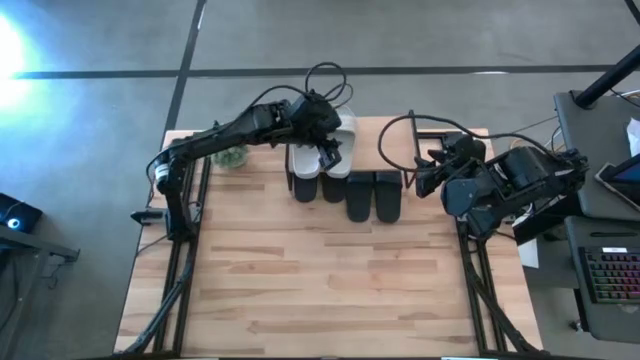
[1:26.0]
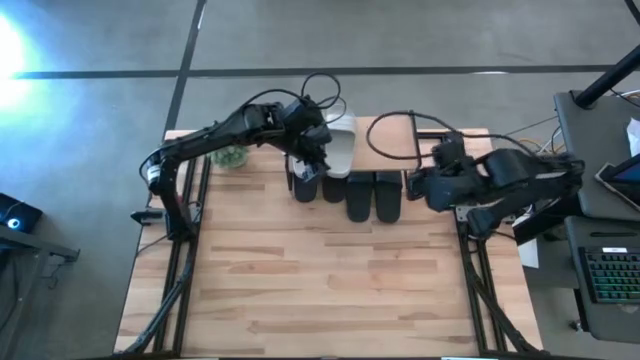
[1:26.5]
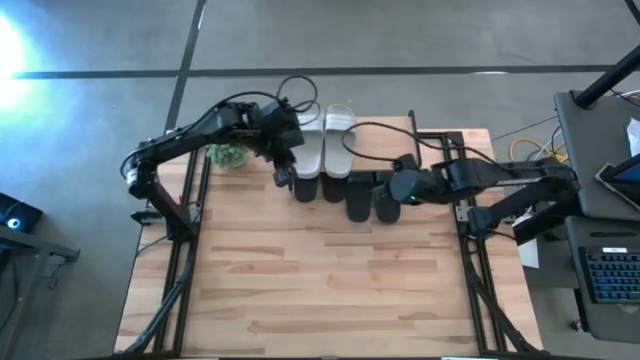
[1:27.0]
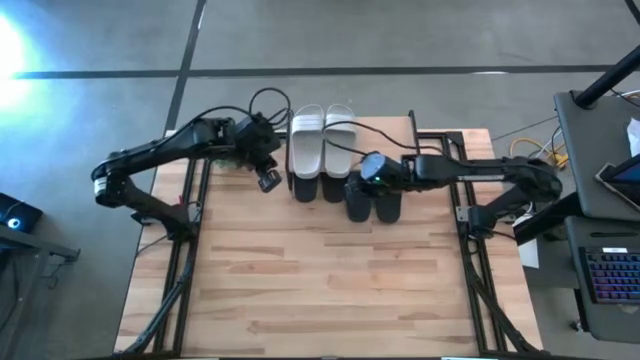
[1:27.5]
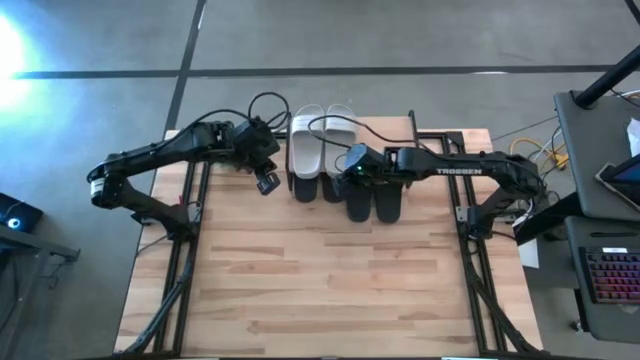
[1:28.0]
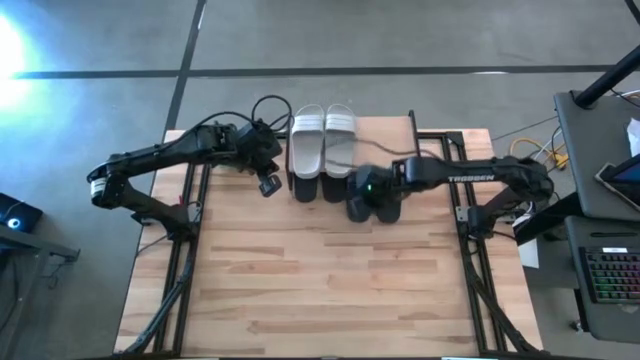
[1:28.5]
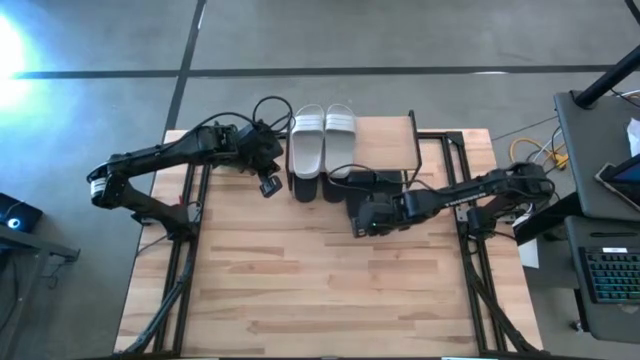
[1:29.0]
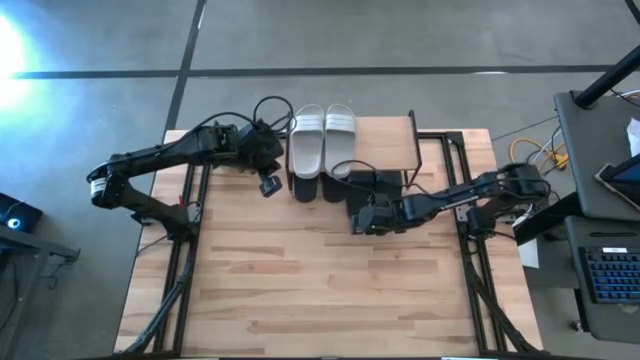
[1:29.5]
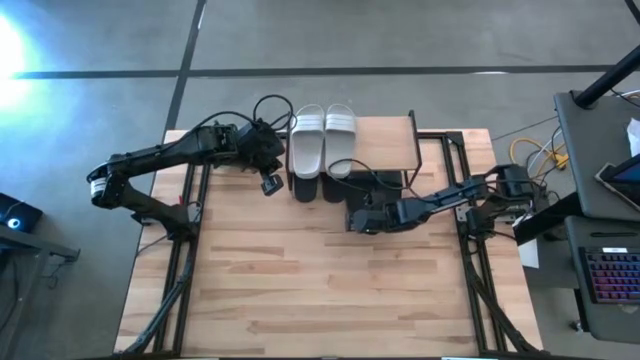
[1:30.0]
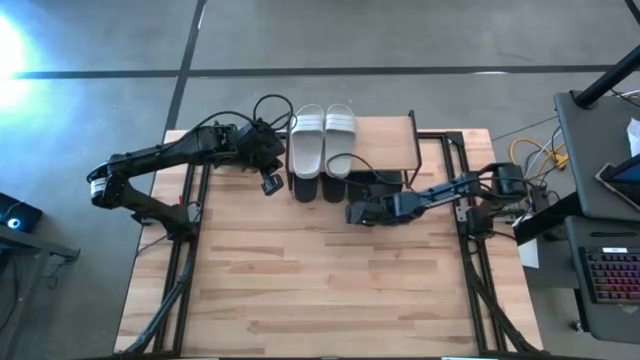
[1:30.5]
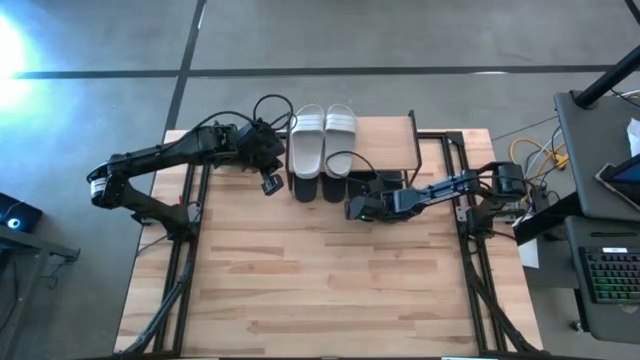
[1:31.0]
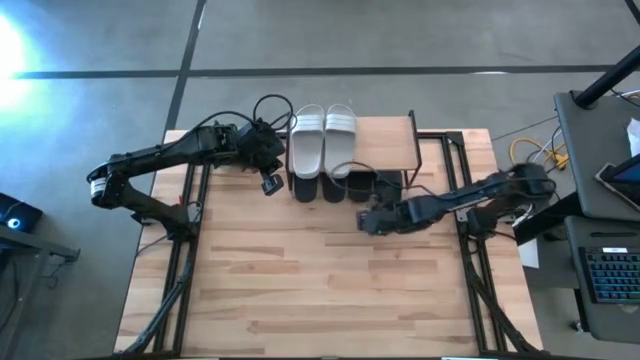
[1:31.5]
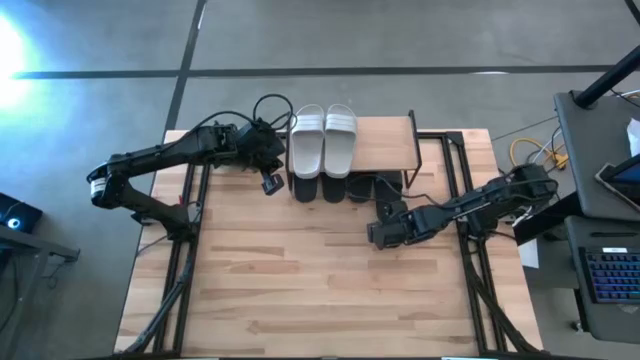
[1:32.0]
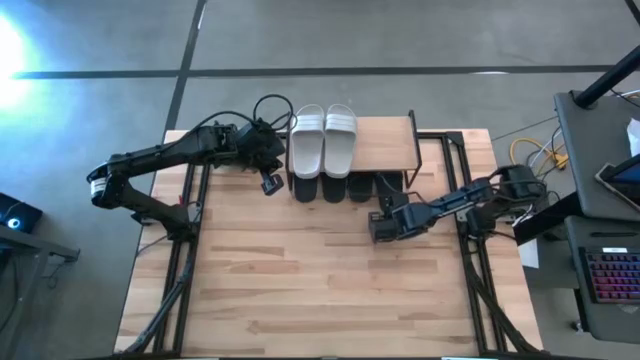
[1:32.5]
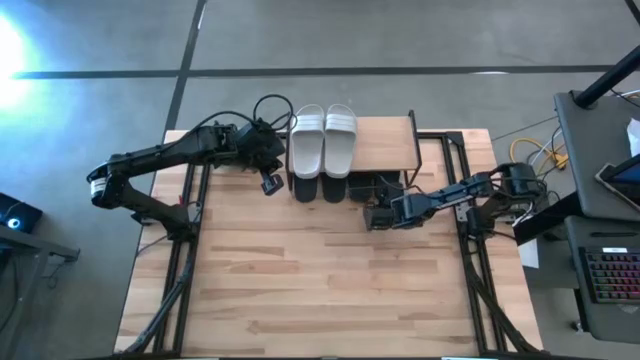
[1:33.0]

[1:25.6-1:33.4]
Task: Pick and place slides into the shelf
Adjust the slides on the shelf and under the shelf

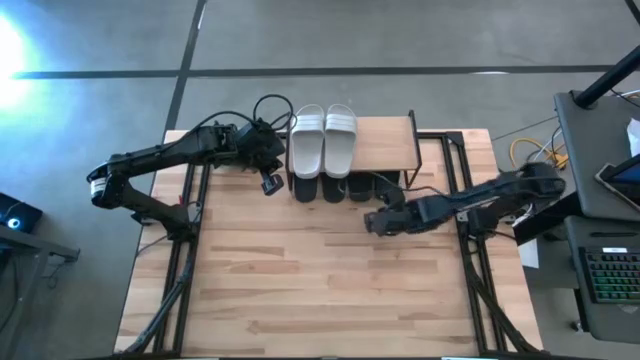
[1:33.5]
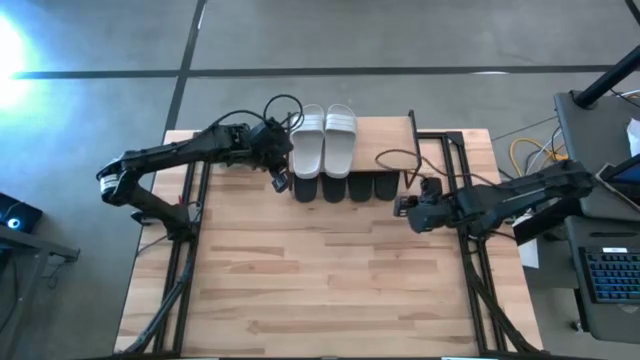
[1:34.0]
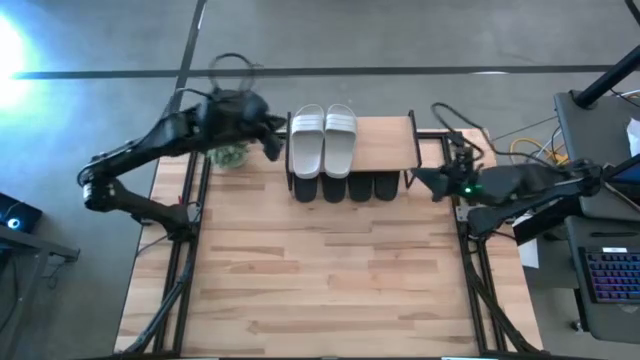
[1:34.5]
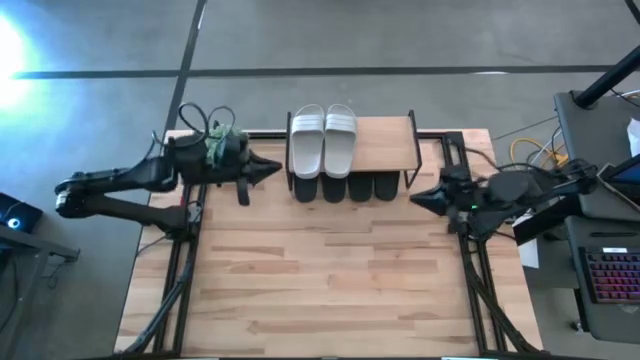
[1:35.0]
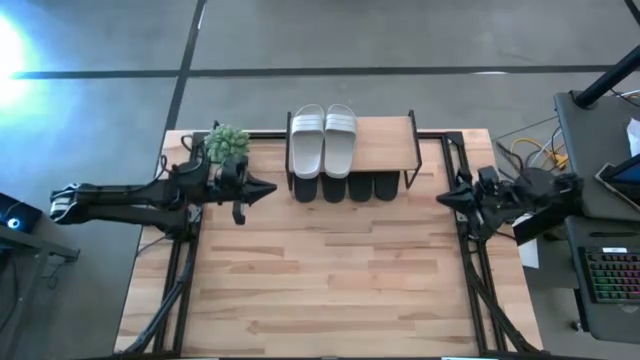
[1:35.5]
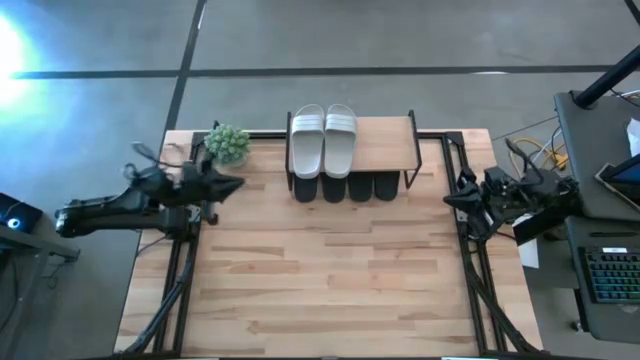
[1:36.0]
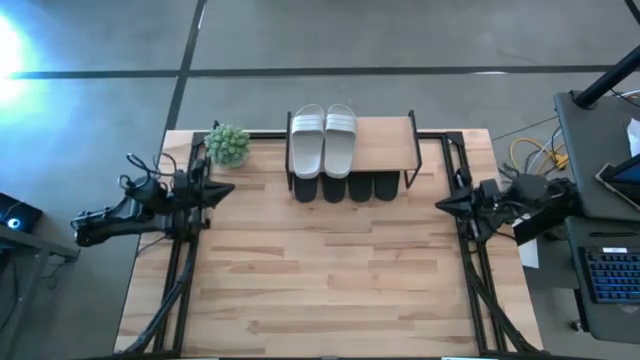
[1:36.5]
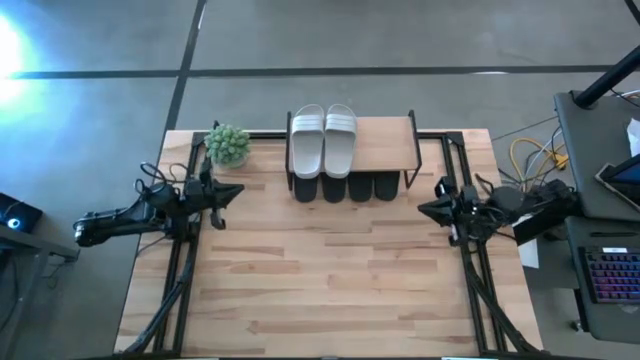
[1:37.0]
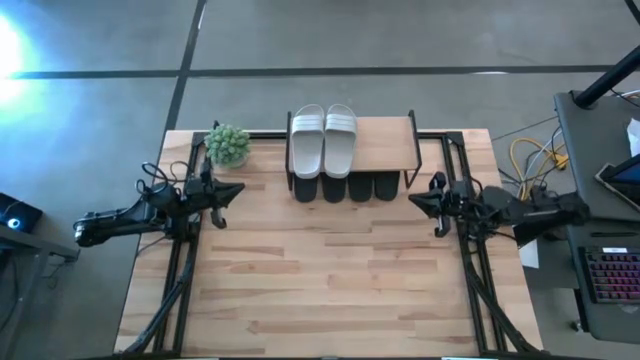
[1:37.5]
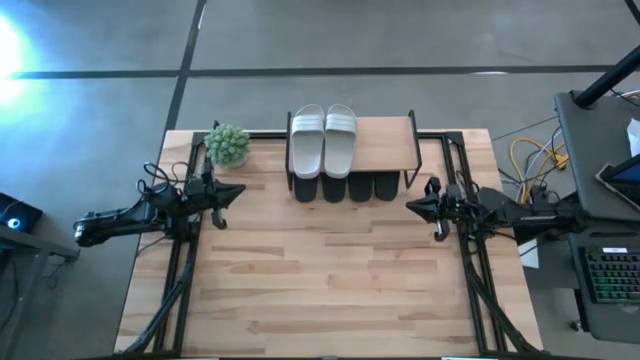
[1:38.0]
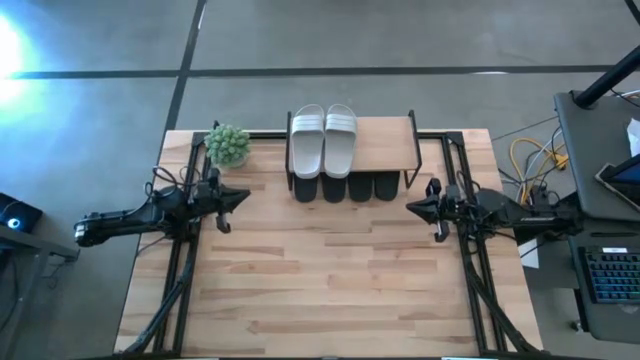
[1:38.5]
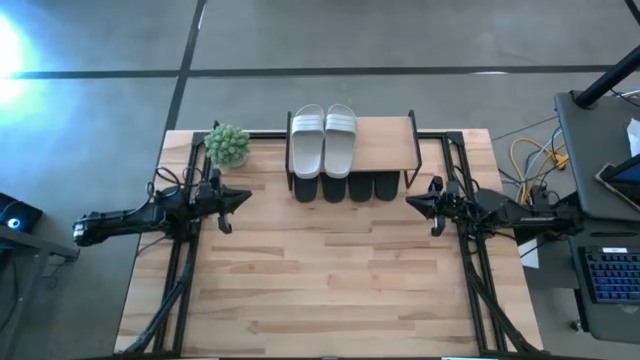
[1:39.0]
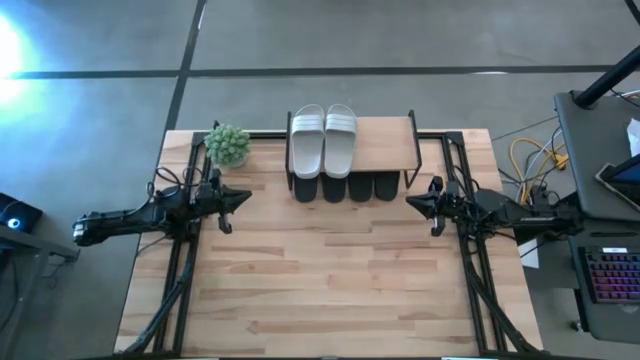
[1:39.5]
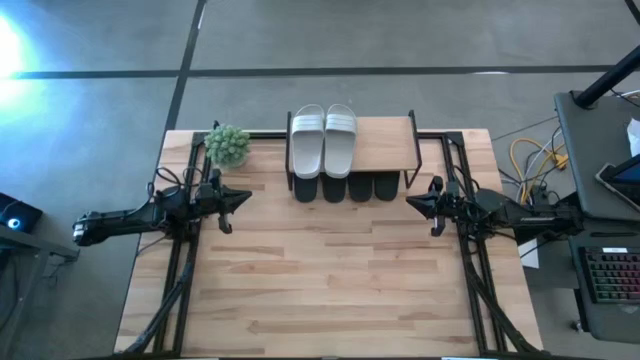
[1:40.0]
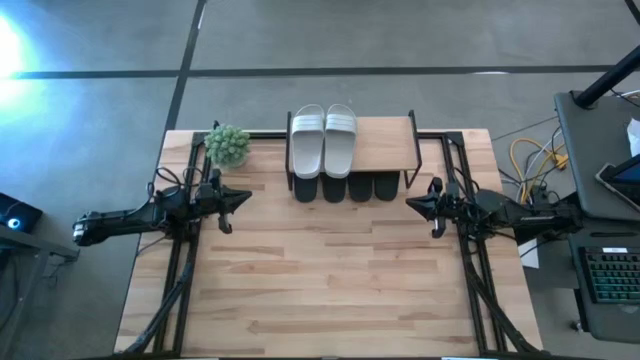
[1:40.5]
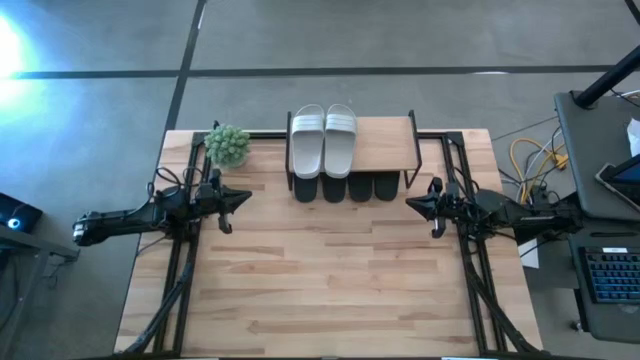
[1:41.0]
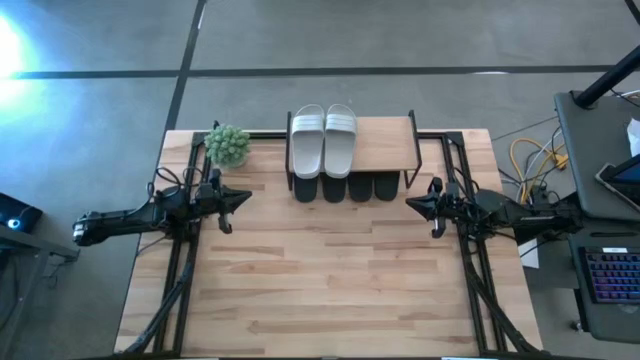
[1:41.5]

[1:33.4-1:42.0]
Return to Home Position

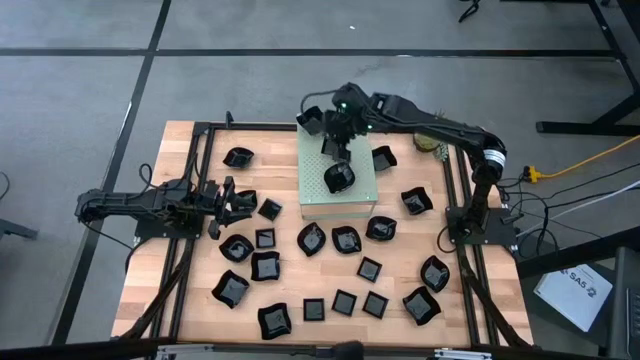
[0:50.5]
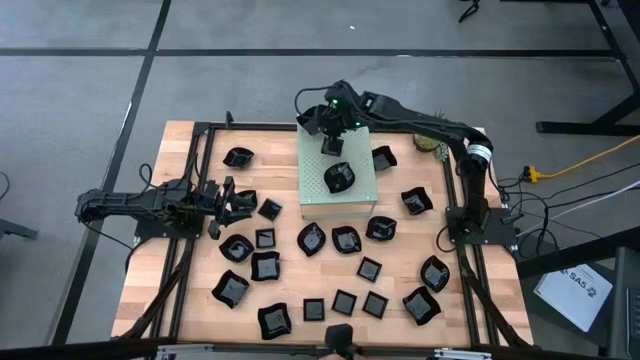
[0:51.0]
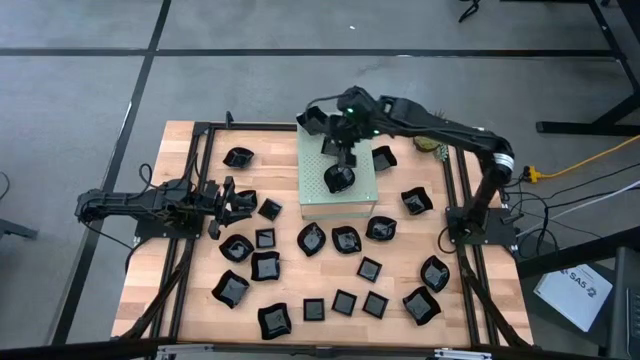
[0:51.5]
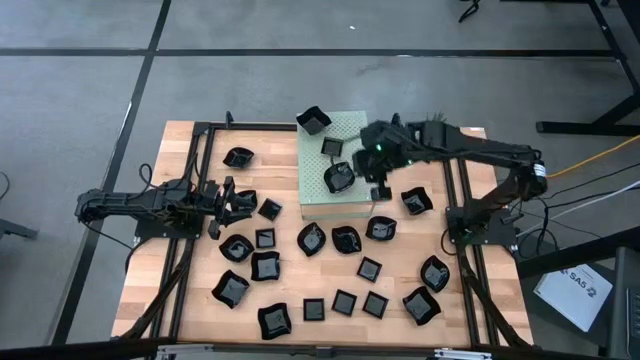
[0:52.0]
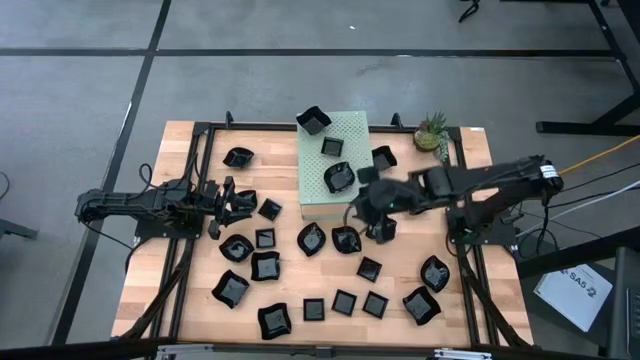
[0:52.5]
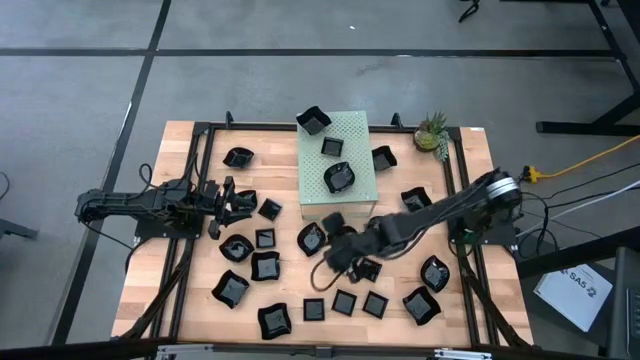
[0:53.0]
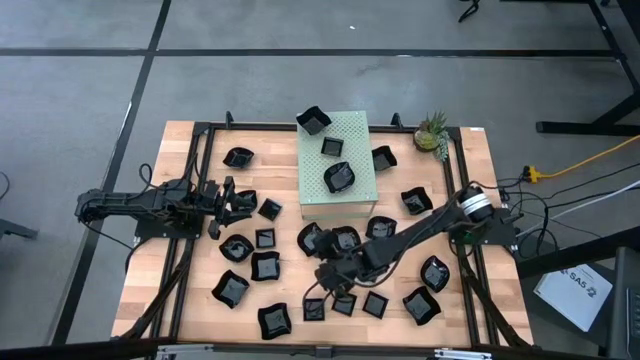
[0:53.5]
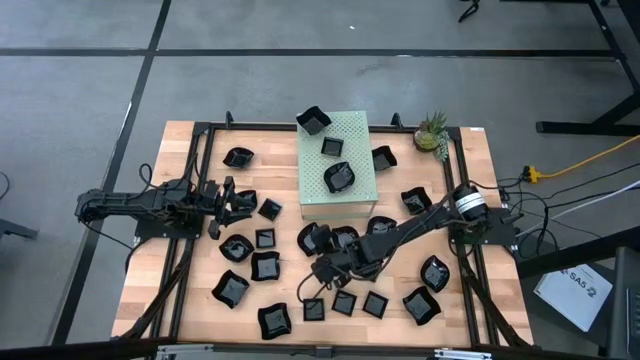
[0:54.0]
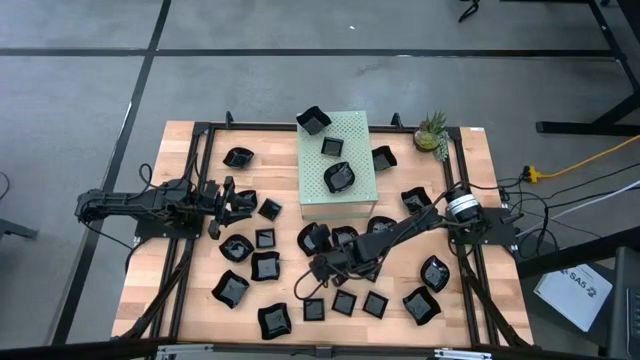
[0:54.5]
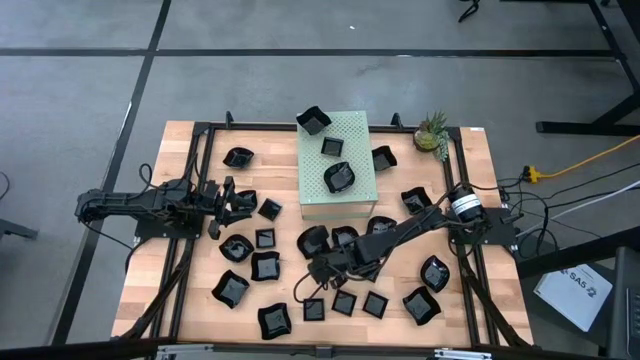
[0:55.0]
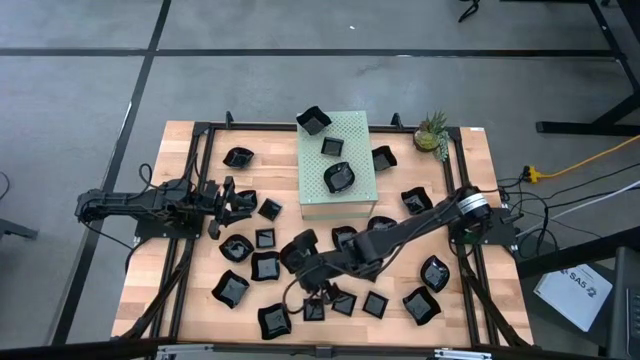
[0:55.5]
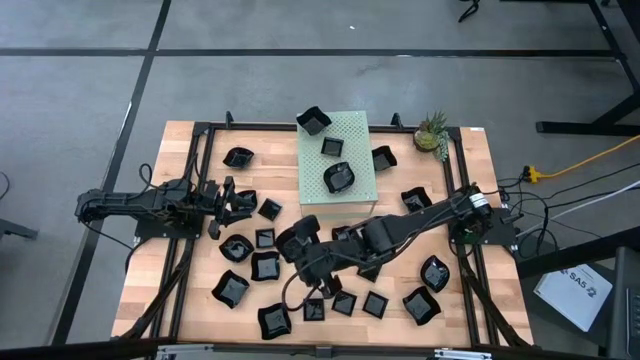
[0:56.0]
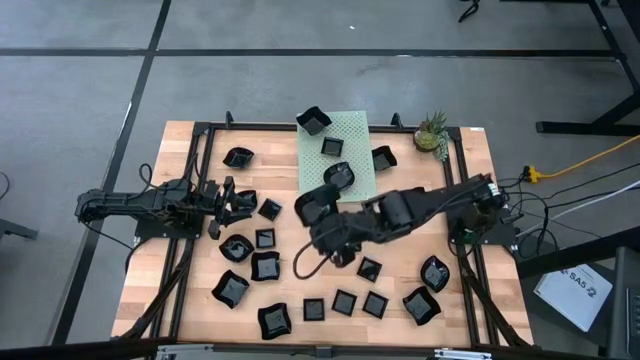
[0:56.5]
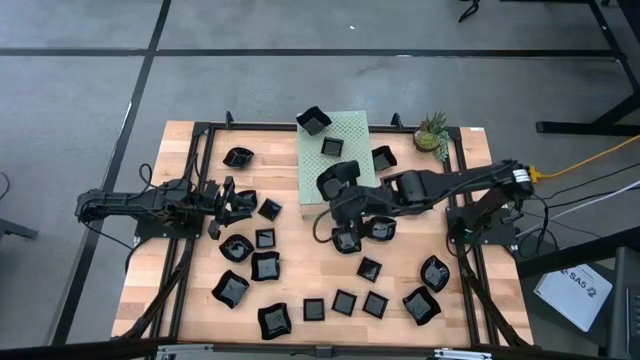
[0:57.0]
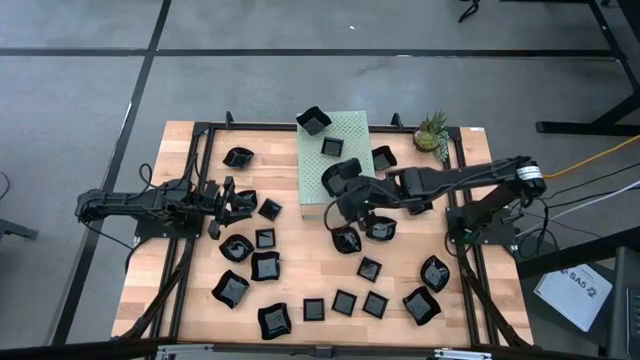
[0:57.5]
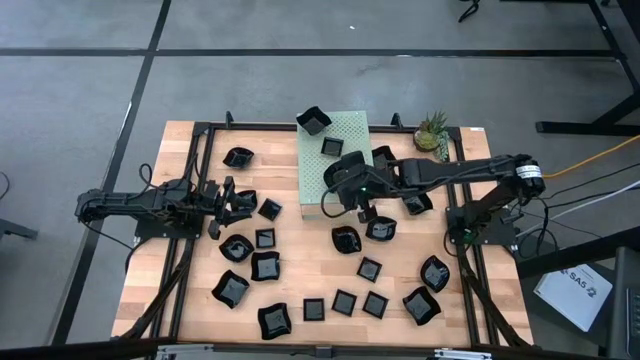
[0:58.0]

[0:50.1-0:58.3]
Task: Pick & Place Mini shaped plates
Stack the black leaf shaped plate on top of the black leaf shape plate on the shelf
